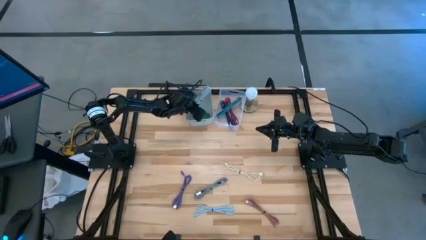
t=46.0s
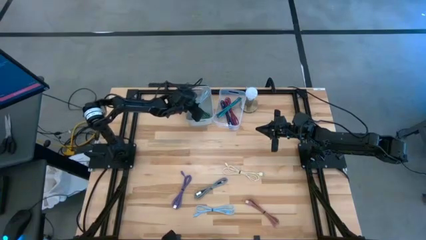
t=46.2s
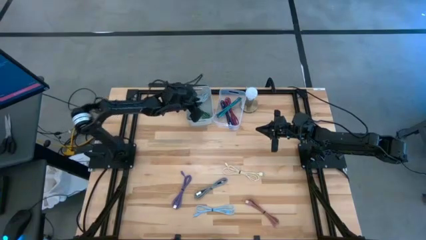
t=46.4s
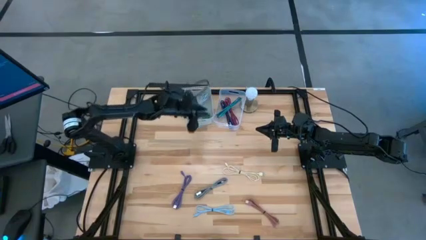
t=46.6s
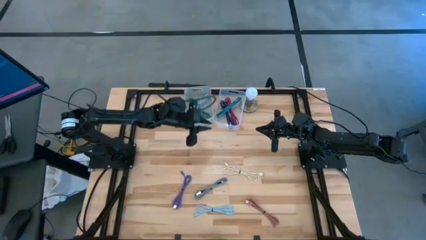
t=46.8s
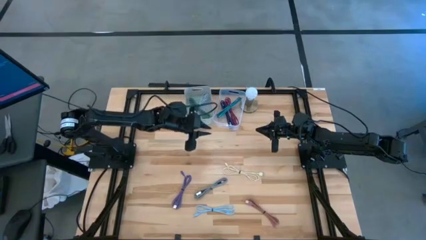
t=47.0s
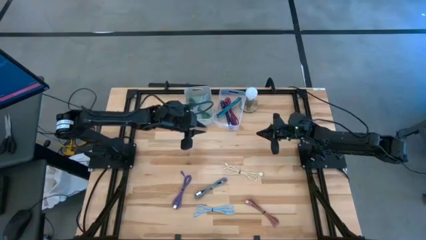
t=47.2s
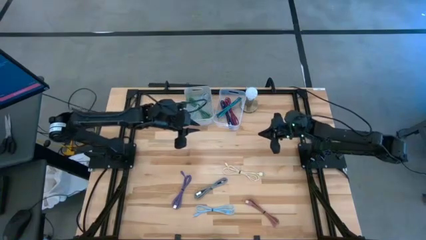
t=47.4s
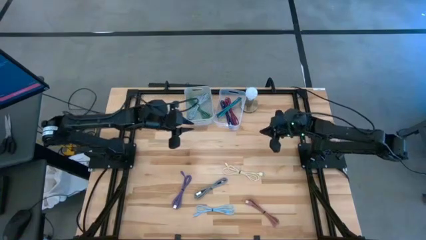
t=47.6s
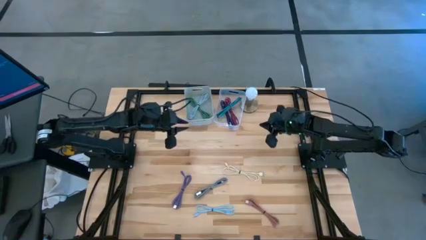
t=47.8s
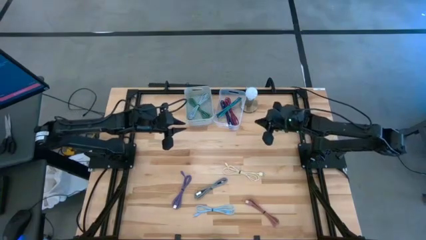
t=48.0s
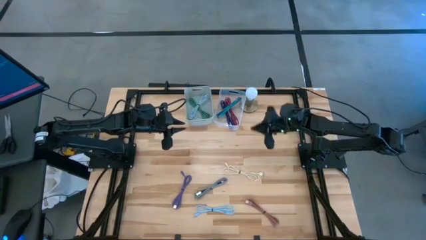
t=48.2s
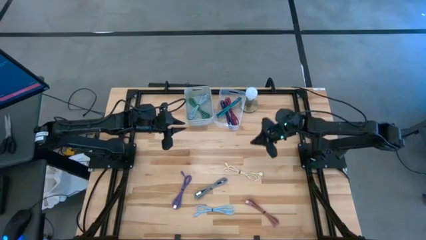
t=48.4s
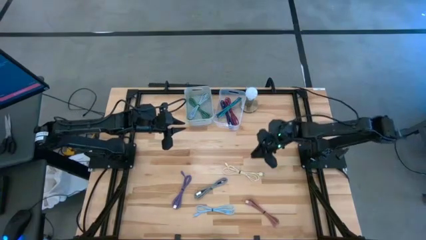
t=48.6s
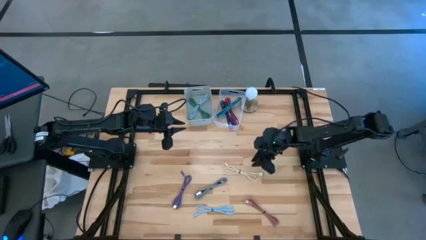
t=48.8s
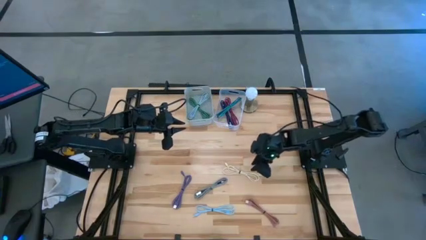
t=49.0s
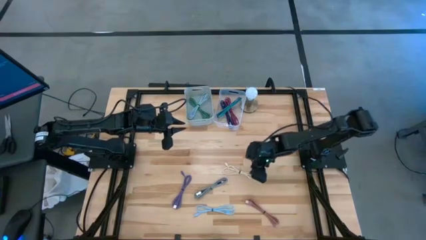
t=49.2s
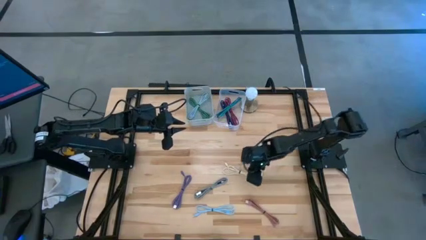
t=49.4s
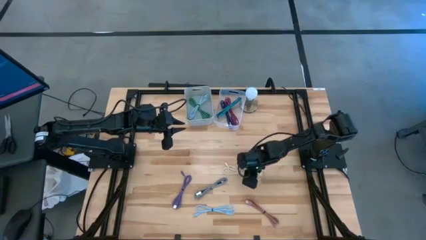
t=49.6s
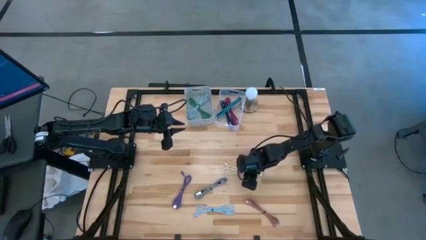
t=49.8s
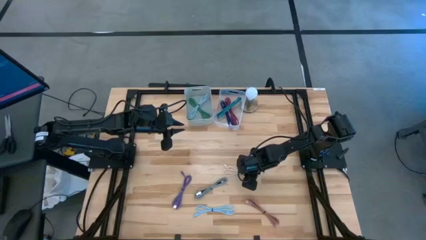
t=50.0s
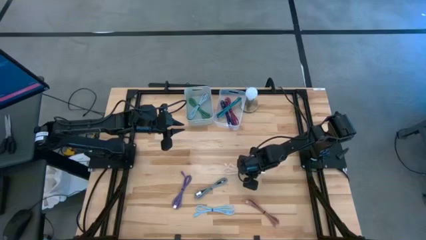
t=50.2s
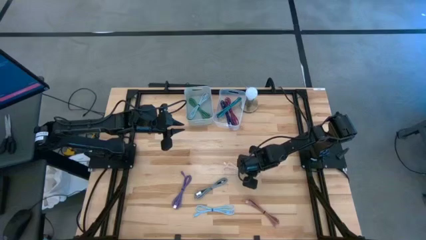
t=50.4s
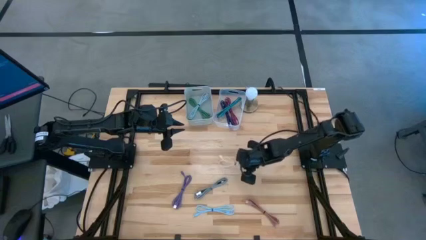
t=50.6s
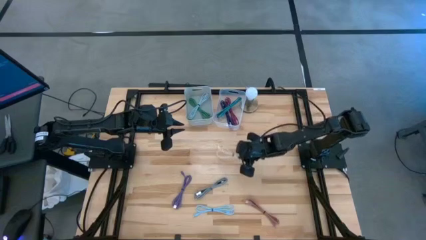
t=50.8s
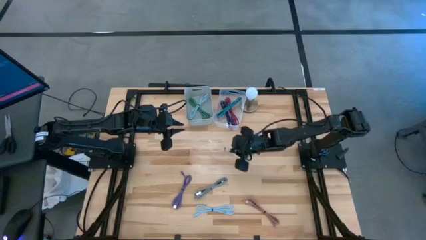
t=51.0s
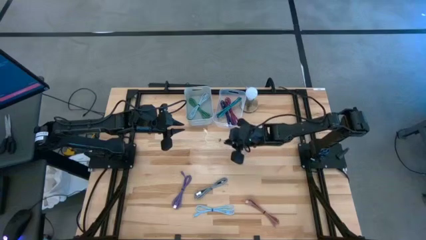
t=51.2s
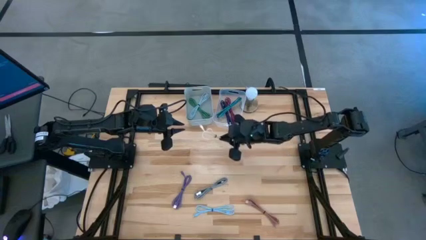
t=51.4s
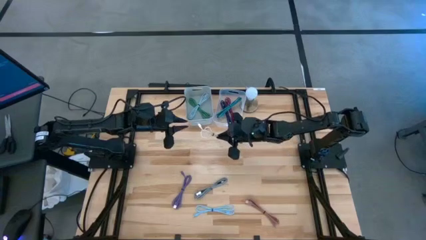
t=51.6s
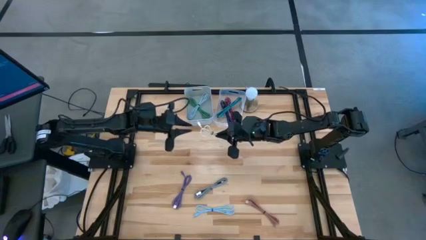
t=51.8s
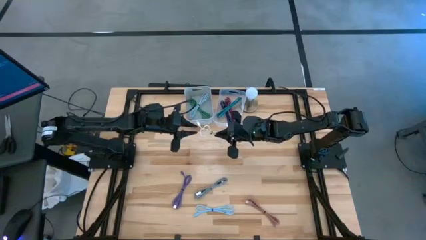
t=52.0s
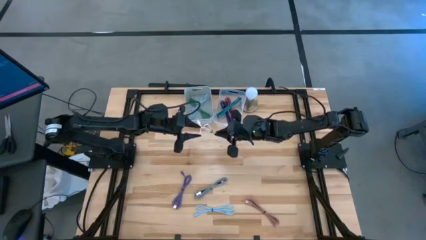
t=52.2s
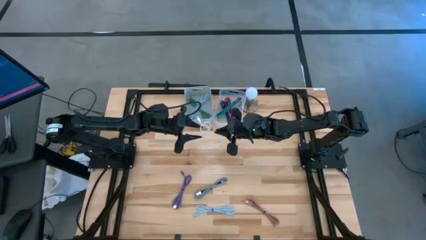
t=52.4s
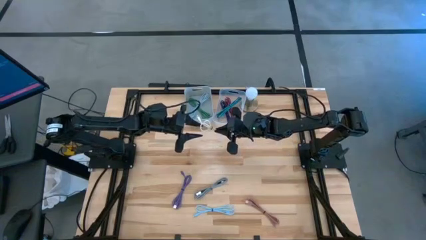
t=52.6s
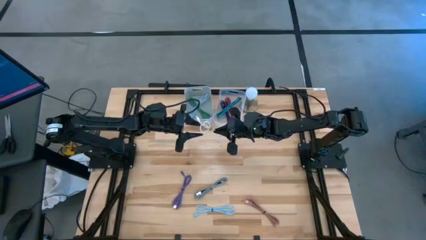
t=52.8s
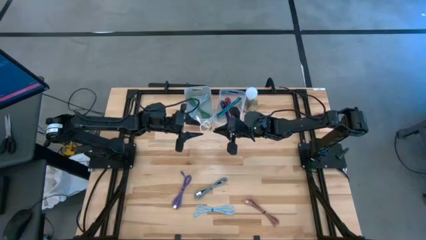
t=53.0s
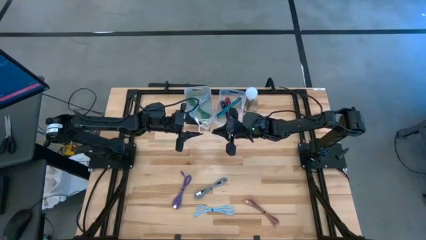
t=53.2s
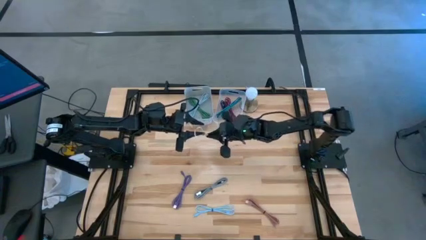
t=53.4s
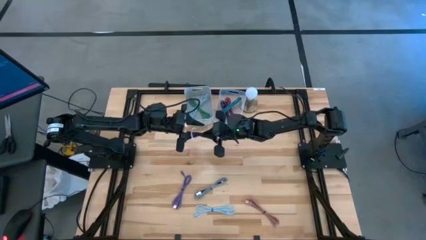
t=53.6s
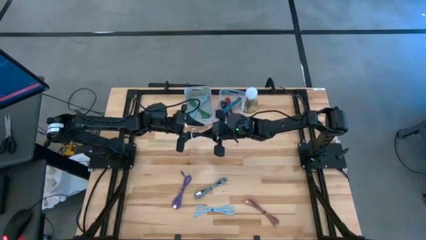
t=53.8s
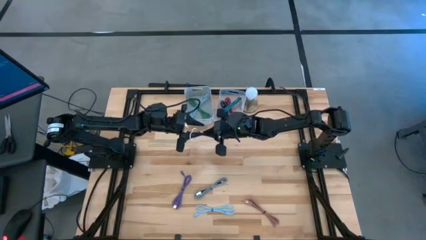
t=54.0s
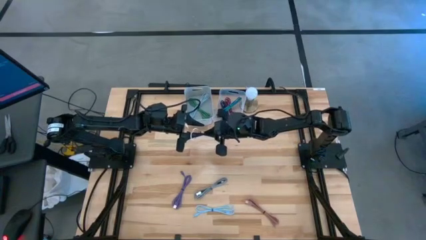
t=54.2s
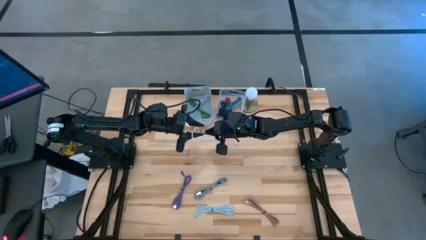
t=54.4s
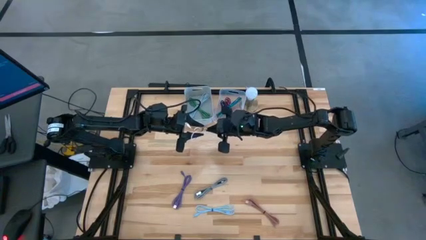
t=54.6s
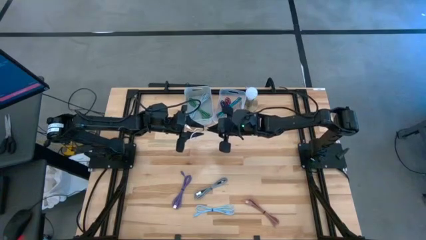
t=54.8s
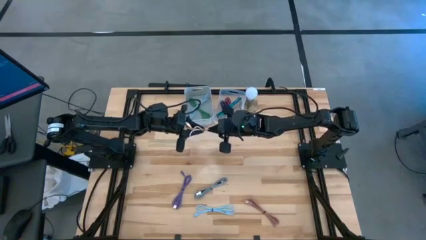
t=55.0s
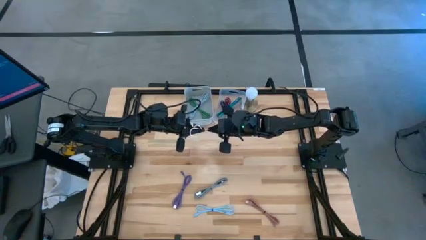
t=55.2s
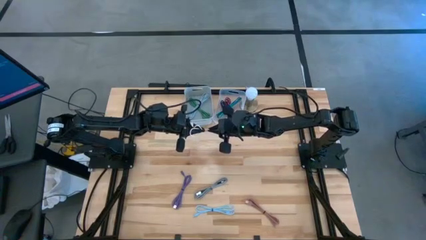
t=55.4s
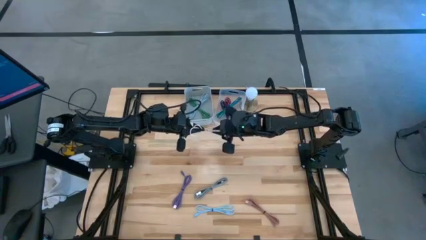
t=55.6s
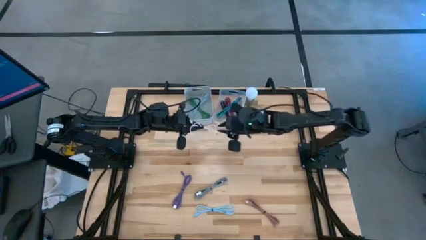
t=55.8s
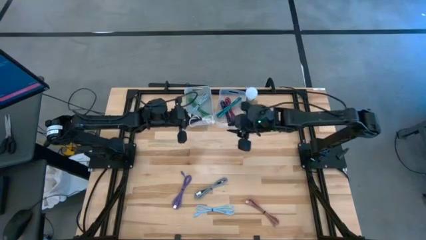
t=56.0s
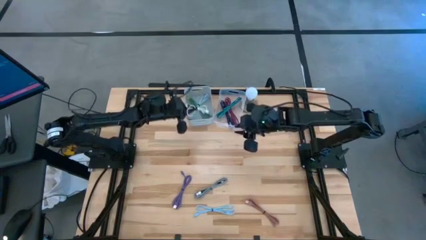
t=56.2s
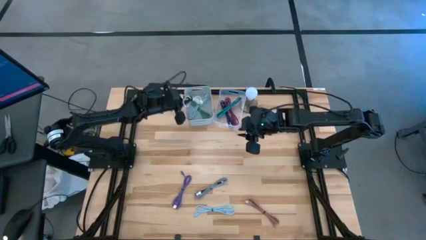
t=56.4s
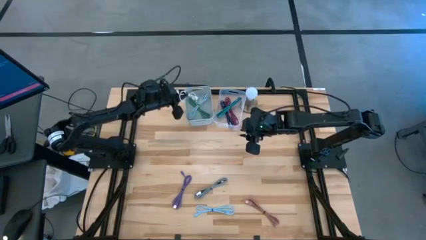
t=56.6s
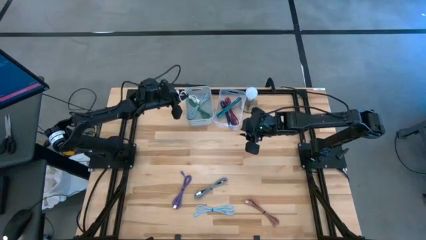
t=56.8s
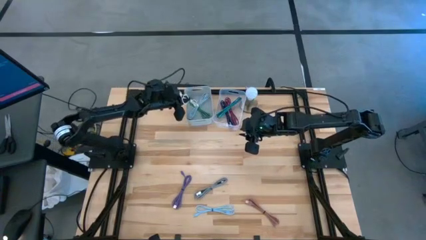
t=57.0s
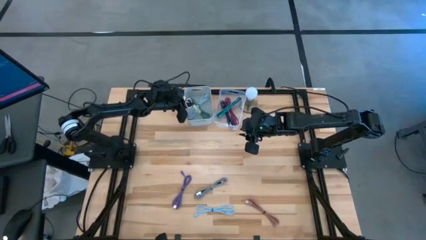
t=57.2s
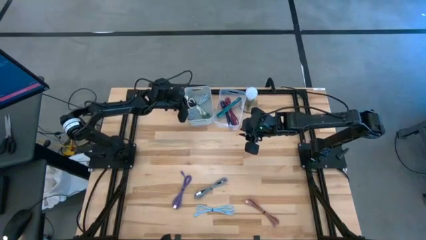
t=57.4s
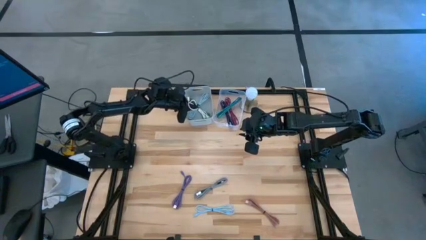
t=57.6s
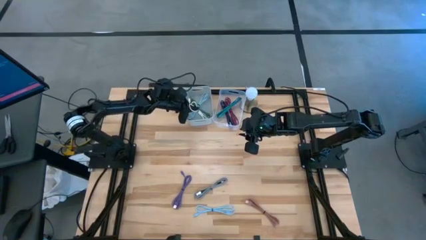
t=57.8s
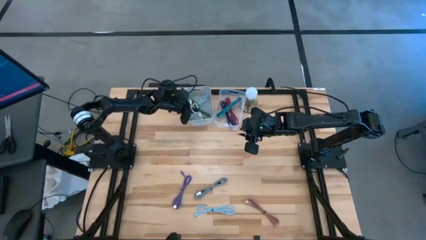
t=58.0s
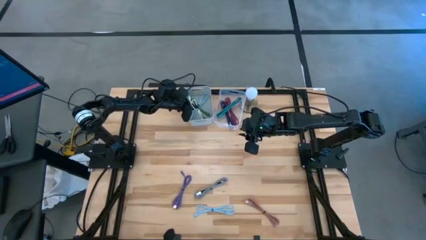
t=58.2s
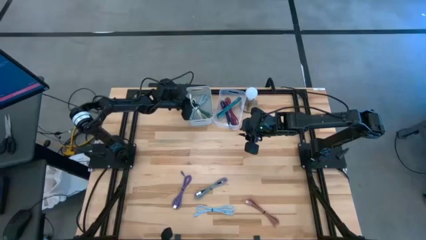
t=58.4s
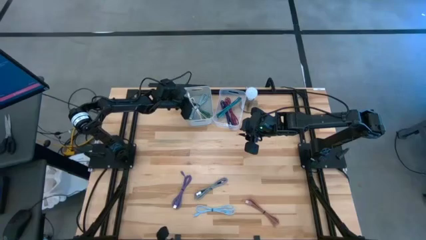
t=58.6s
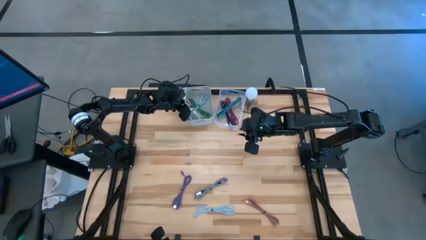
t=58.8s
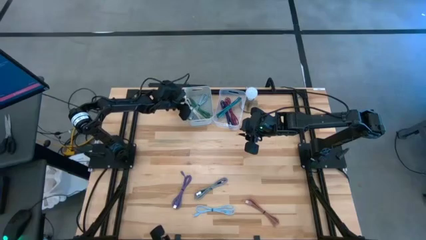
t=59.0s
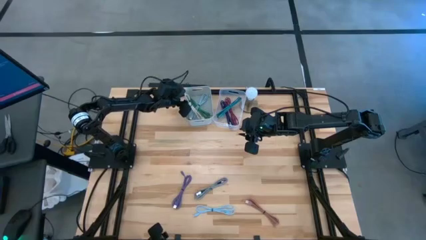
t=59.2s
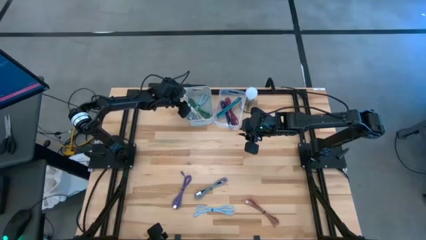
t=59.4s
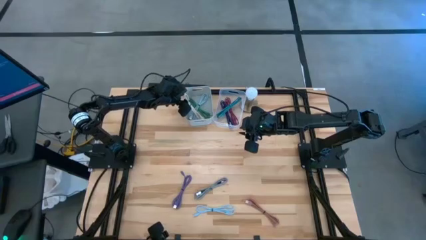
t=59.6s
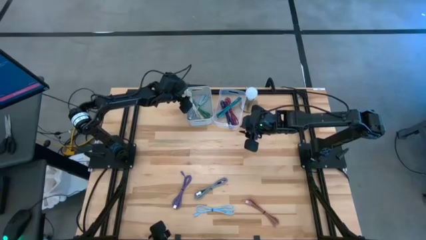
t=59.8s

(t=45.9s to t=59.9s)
Task: Pick & Place USB Port
Put the yellow charger cable into the white bin

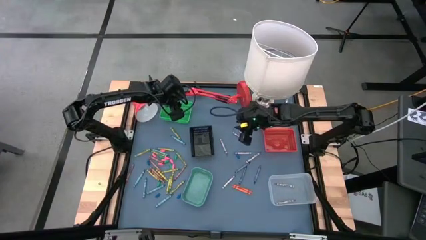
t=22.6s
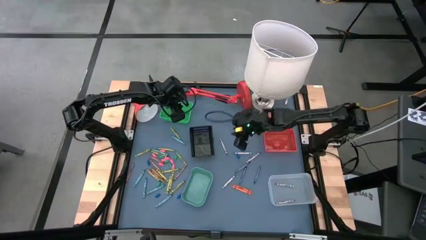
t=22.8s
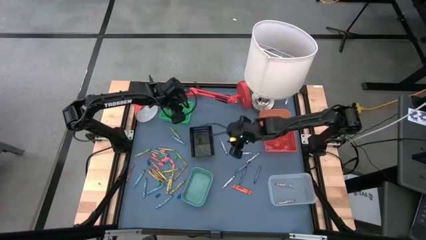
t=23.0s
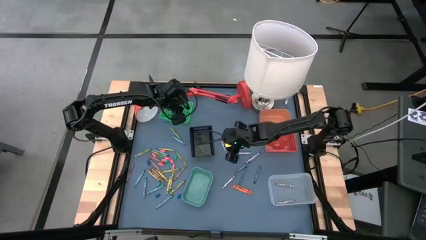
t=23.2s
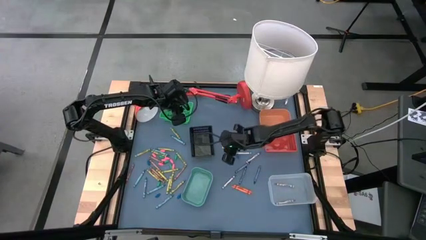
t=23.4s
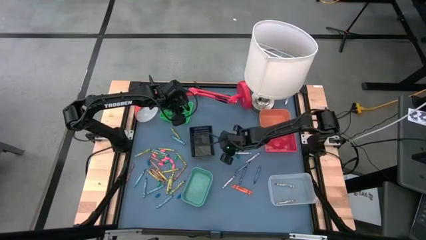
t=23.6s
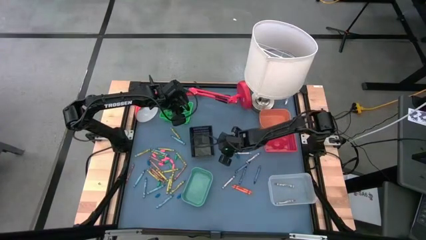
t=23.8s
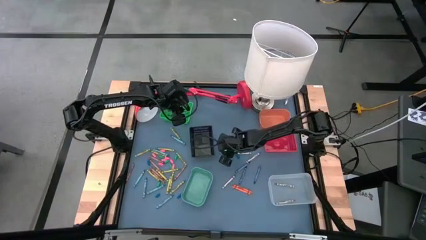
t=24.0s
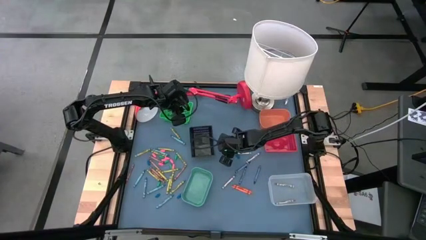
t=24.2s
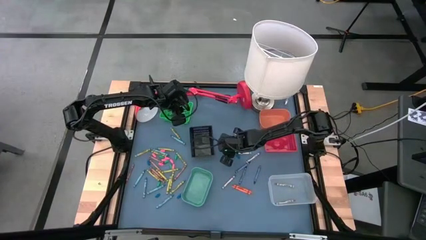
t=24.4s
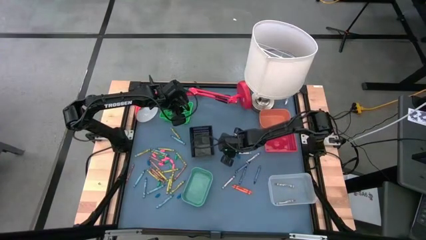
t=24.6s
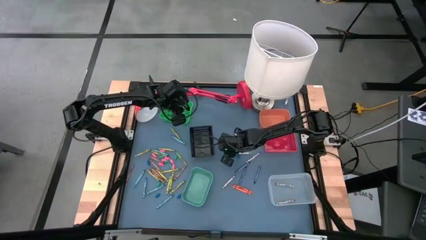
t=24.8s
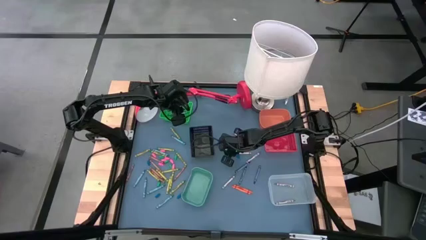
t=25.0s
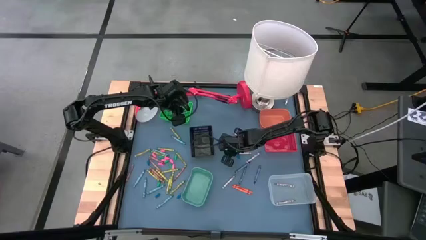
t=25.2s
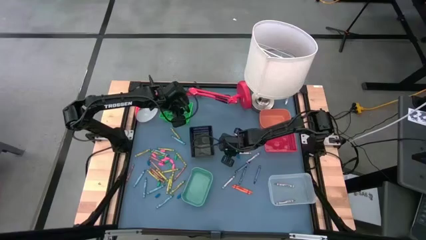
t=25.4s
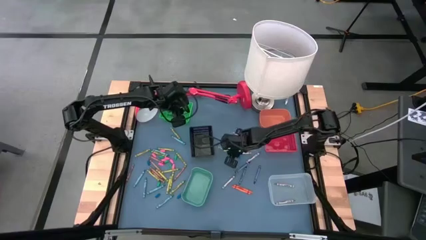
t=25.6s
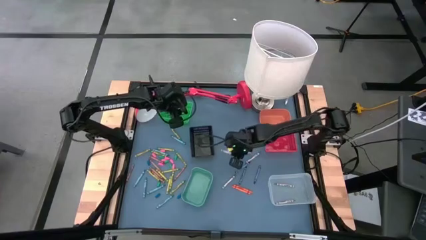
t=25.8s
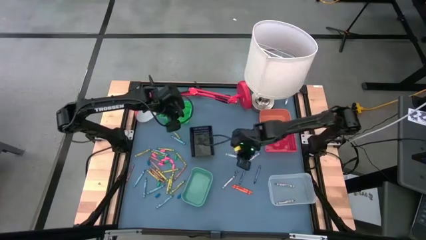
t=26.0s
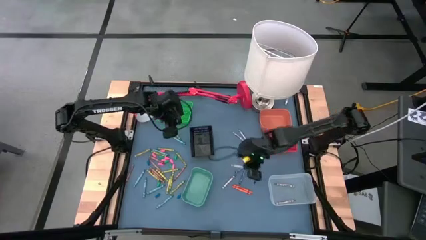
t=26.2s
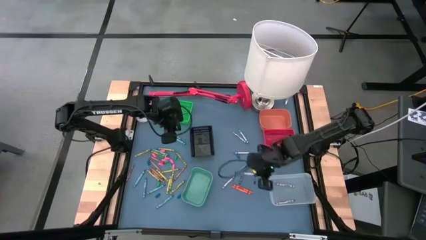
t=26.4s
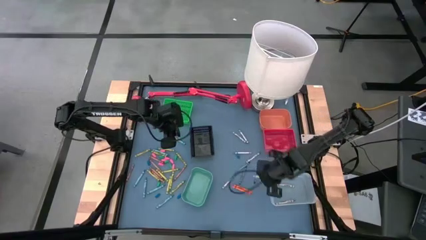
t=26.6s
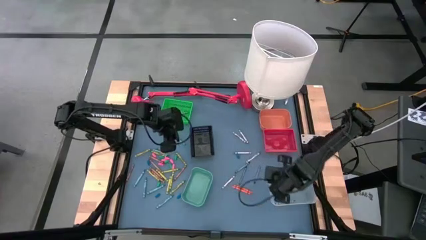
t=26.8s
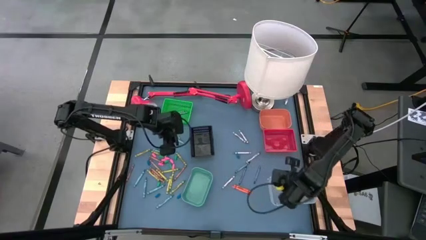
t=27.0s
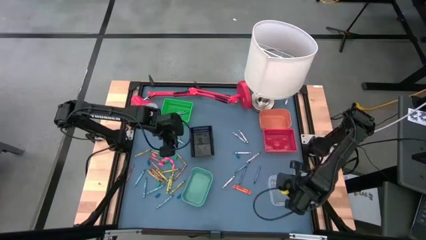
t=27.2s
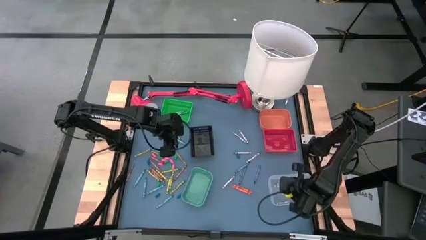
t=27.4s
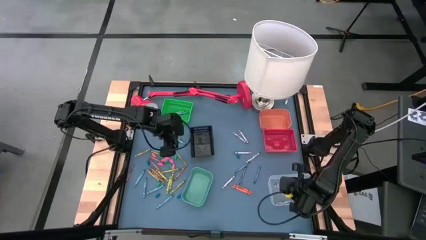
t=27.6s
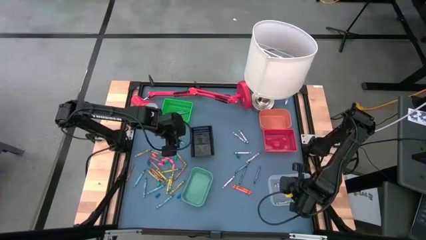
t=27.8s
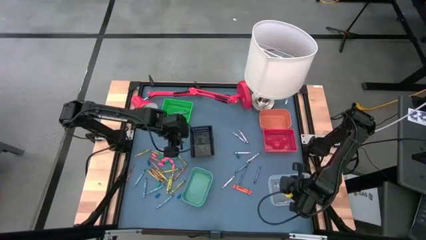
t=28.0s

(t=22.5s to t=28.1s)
Task: Sort crayons
Put the gray crayon into the white bin
